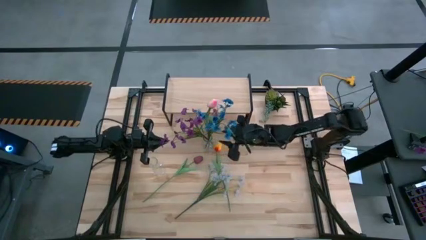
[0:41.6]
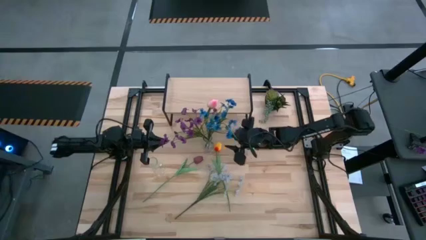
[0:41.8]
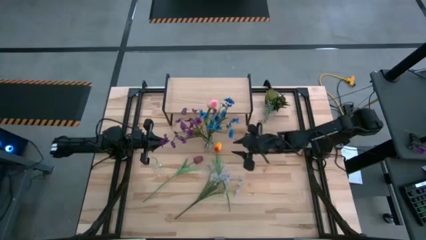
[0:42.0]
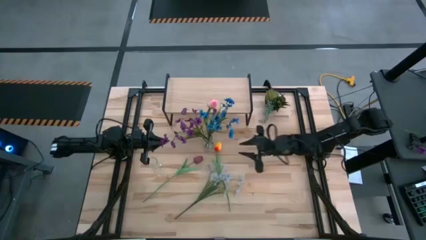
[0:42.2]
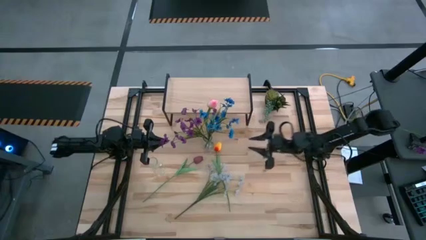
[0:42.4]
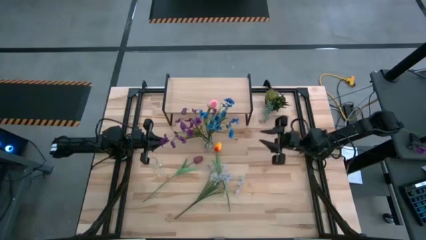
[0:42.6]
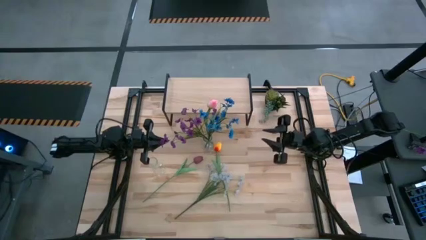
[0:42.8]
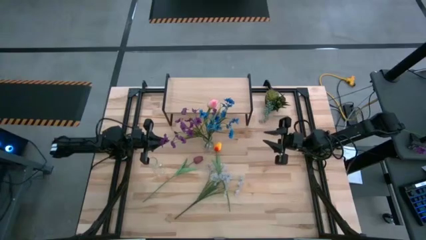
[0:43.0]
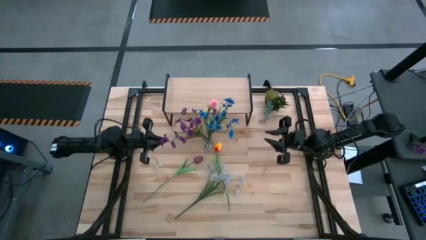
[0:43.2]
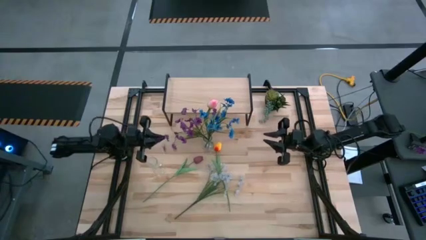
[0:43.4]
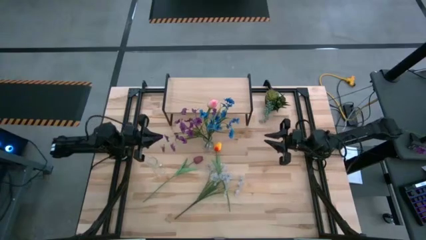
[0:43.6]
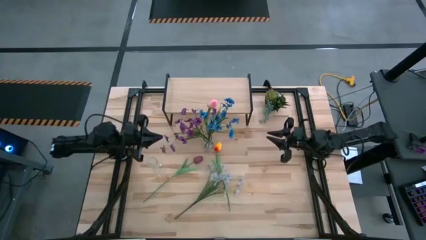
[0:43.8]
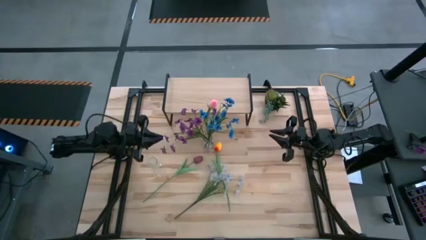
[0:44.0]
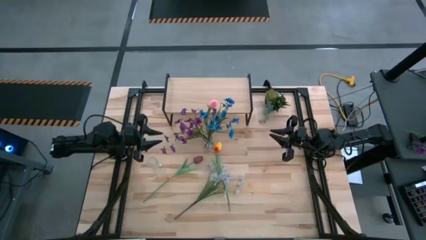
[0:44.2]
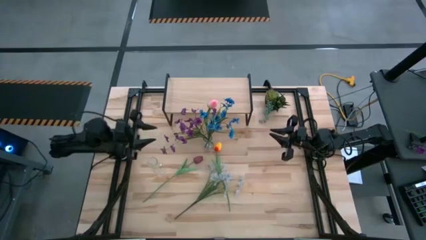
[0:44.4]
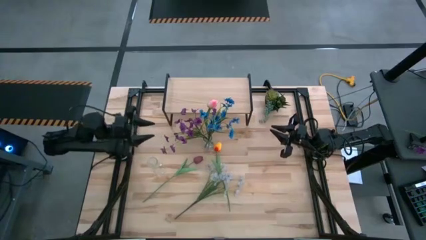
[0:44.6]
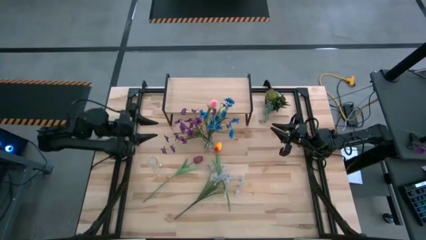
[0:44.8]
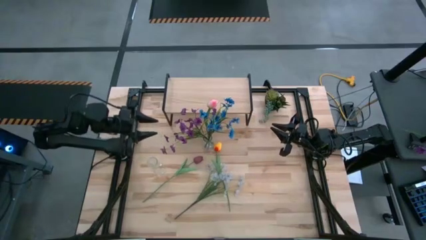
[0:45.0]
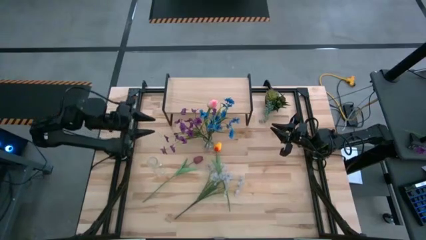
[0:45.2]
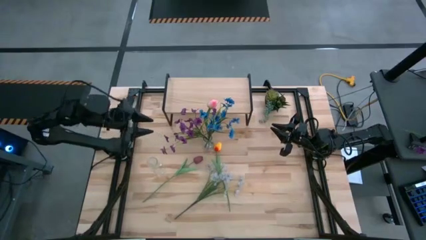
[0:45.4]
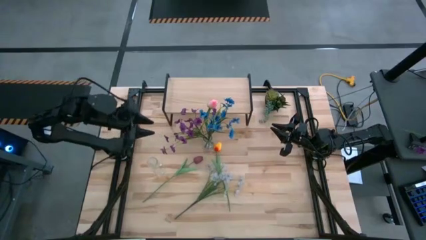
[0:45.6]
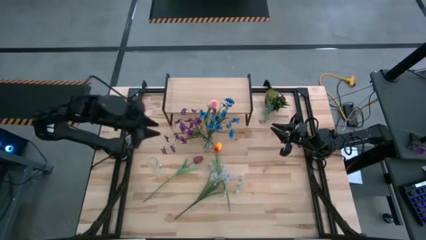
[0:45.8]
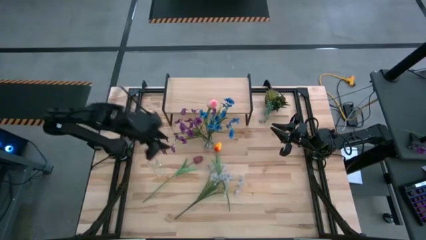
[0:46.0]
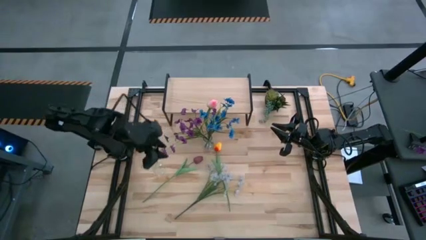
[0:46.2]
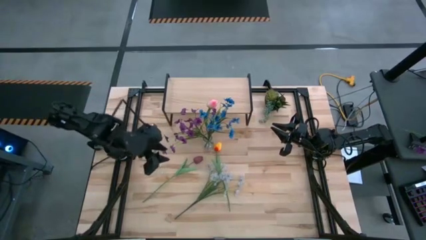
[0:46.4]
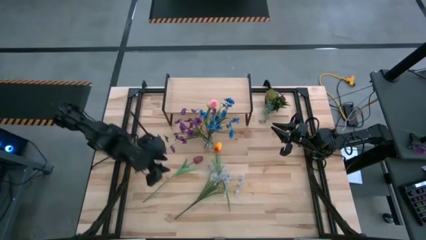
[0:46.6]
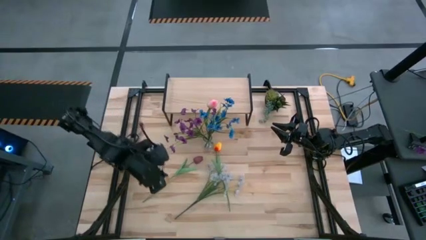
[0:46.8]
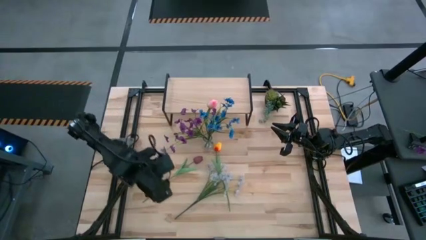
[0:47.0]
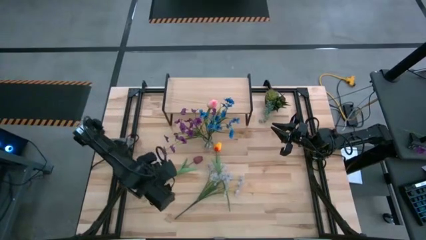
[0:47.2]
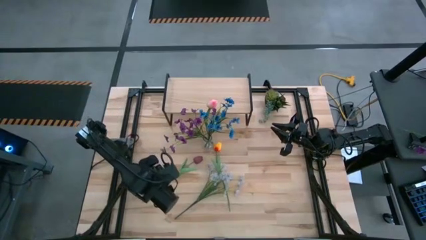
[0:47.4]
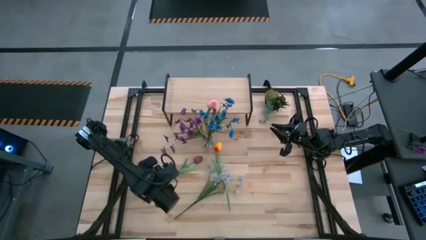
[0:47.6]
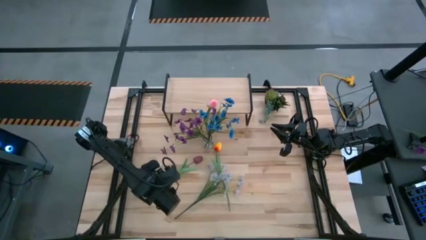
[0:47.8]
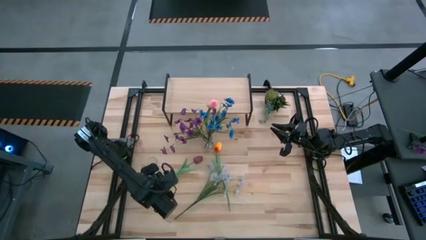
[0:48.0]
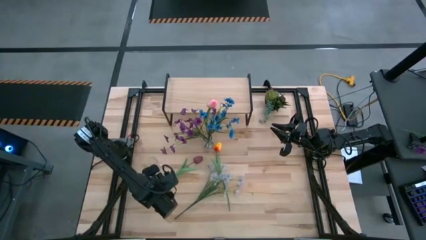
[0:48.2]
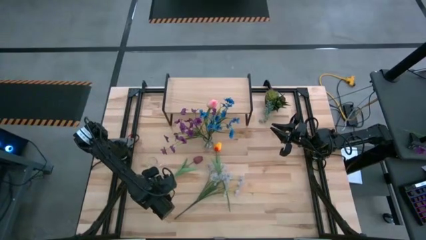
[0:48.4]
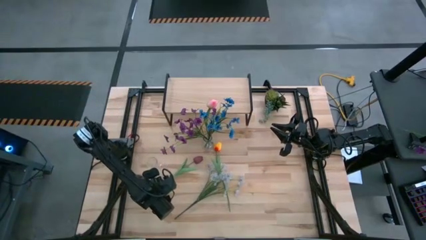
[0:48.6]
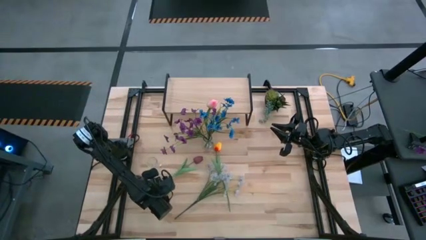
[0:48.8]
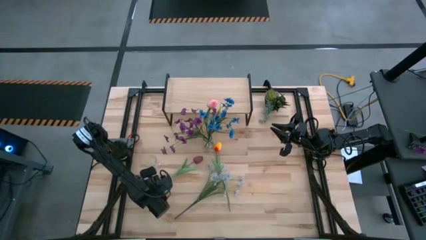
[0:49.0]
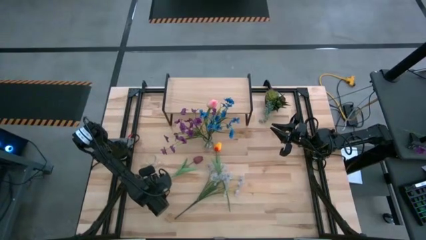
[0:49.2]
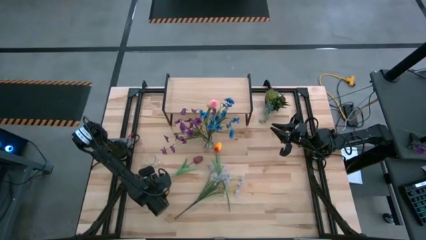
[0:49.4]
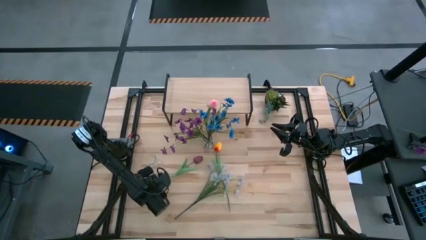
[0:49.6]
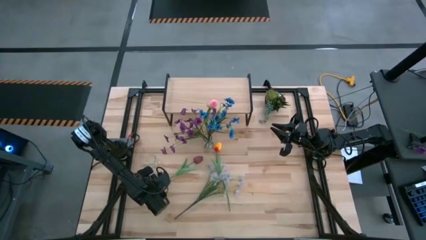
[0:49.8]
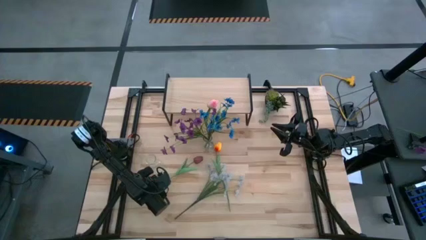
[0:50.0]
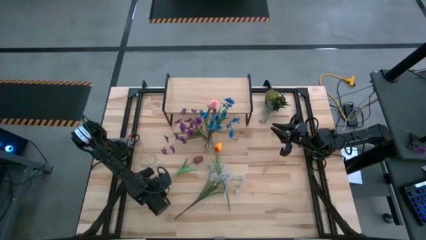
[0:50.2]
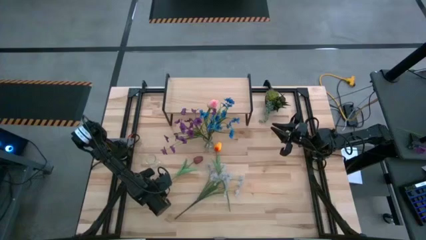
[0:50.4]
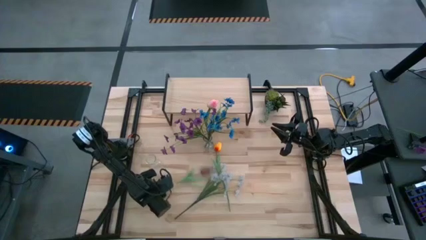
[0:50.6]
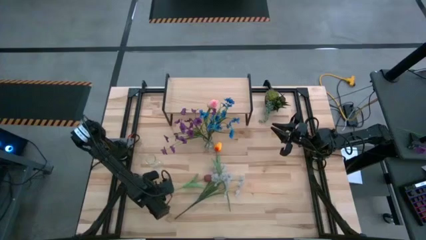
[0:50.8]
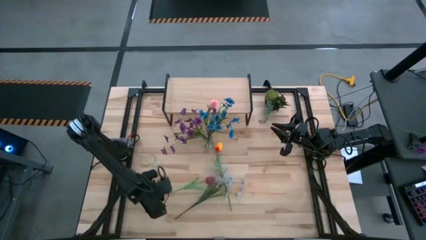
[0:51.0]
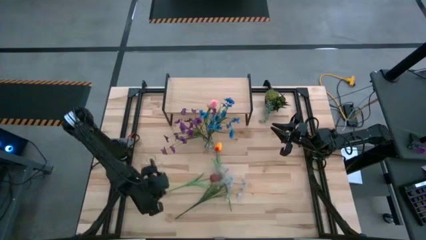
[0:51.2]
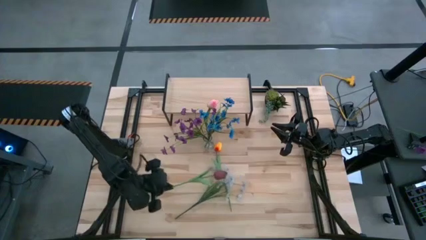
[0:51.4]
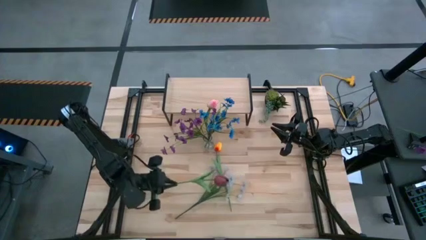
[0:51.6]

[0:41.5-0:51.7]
Task: Pick and place flowers into a vace then onto a shelf
Put the red flower into the left transparent vase

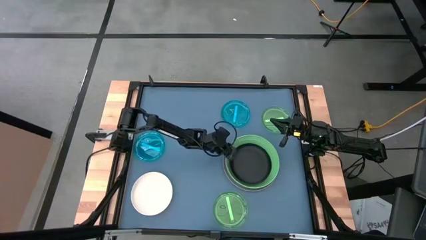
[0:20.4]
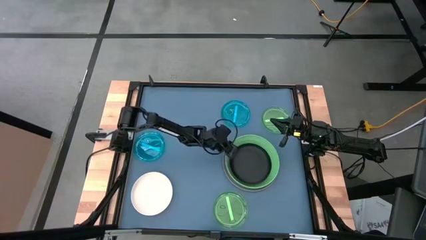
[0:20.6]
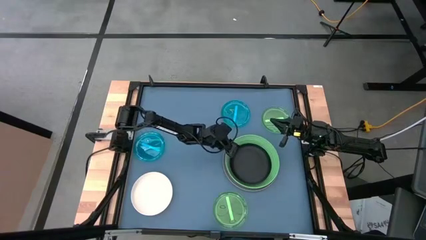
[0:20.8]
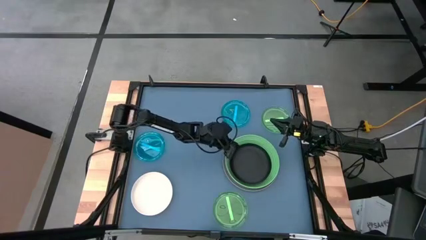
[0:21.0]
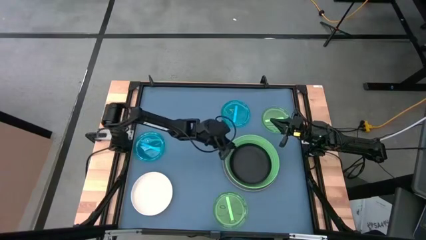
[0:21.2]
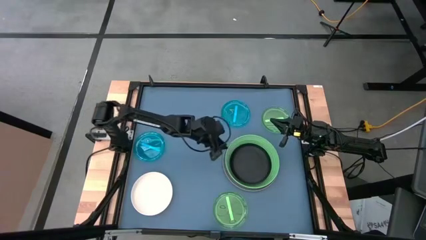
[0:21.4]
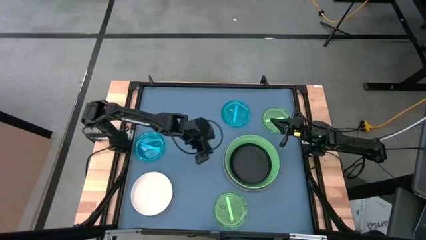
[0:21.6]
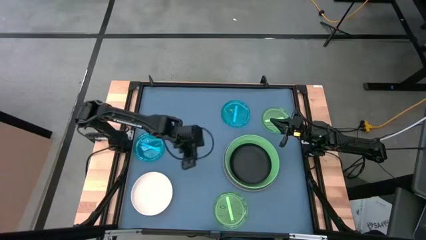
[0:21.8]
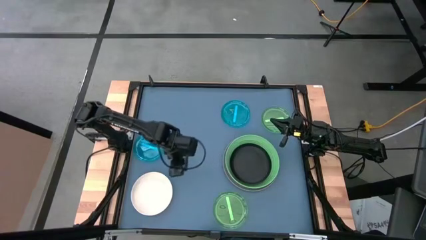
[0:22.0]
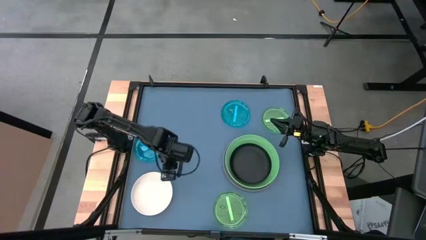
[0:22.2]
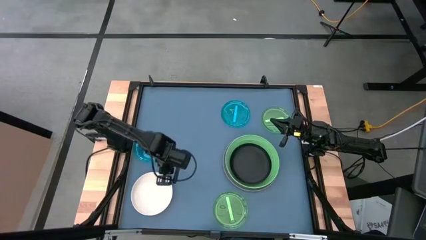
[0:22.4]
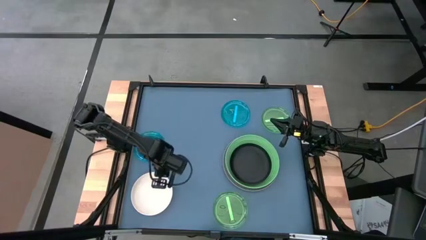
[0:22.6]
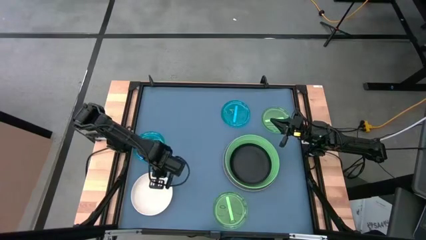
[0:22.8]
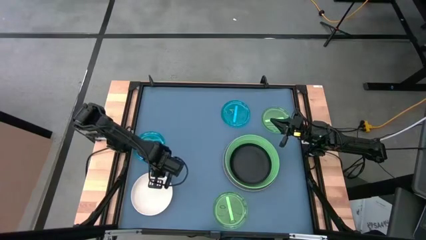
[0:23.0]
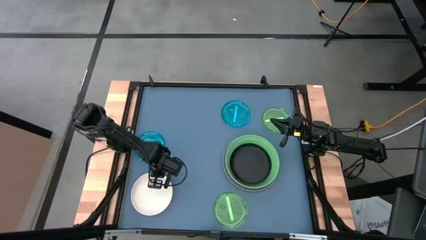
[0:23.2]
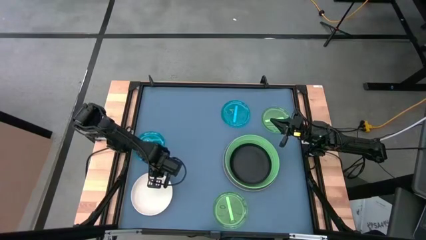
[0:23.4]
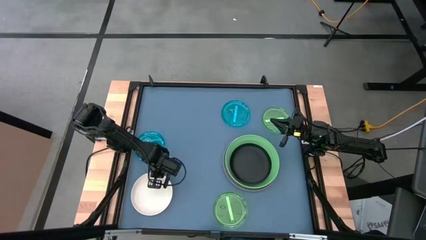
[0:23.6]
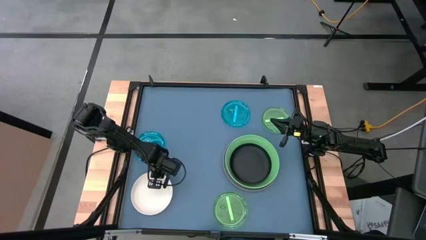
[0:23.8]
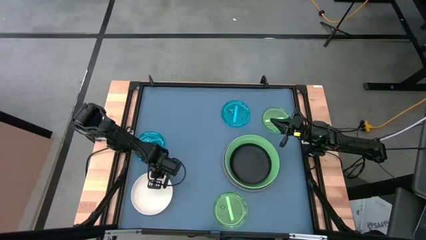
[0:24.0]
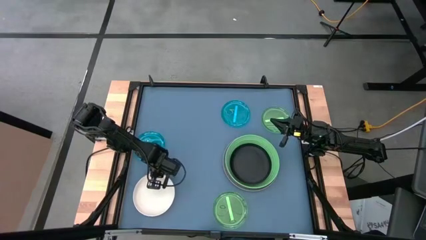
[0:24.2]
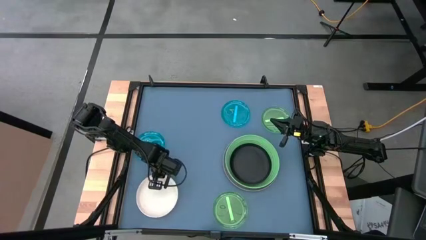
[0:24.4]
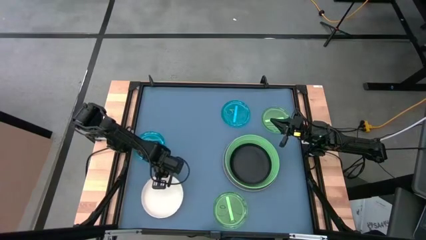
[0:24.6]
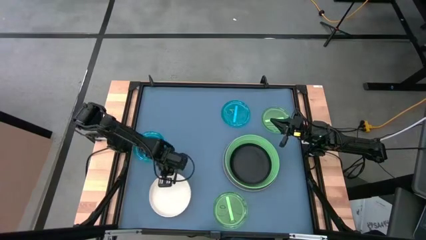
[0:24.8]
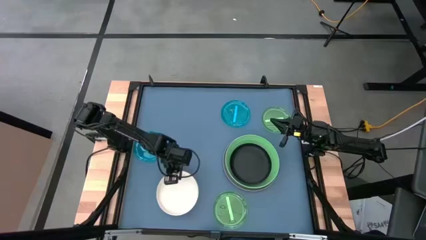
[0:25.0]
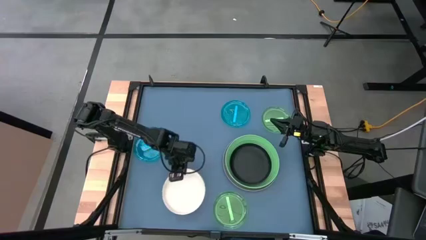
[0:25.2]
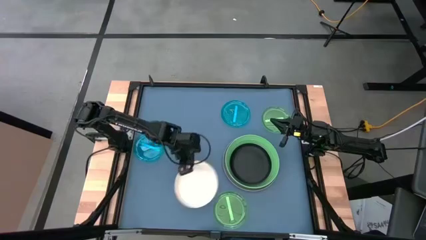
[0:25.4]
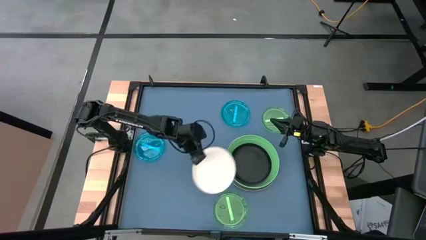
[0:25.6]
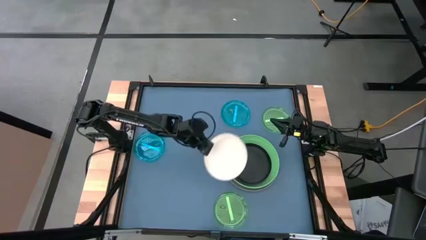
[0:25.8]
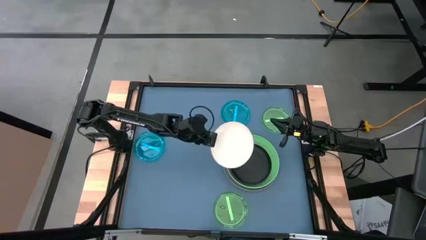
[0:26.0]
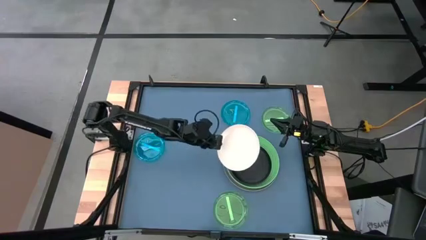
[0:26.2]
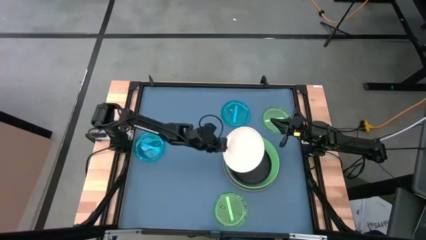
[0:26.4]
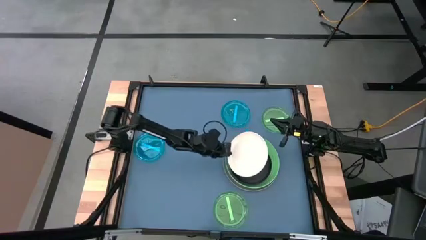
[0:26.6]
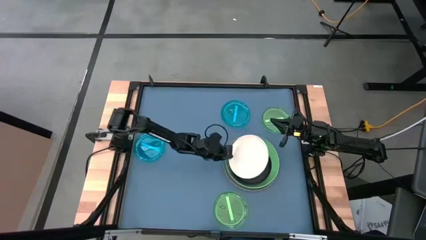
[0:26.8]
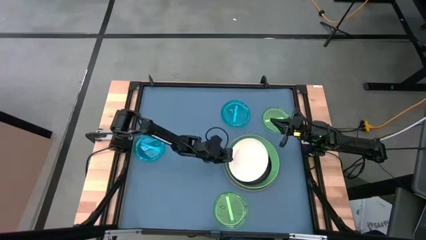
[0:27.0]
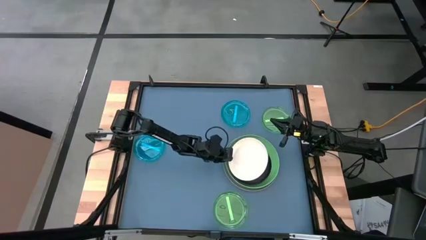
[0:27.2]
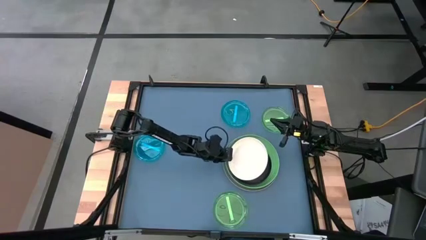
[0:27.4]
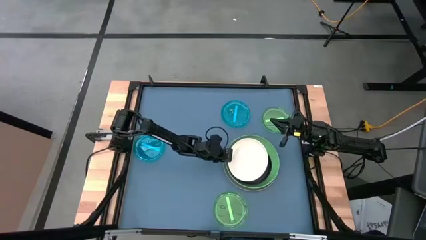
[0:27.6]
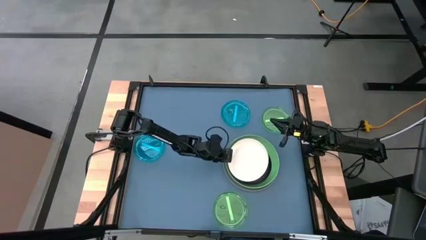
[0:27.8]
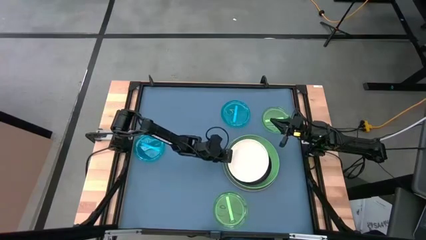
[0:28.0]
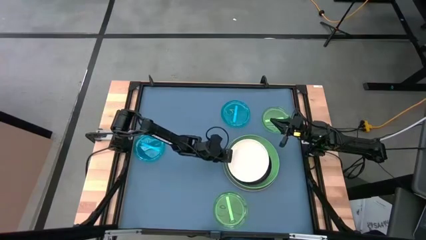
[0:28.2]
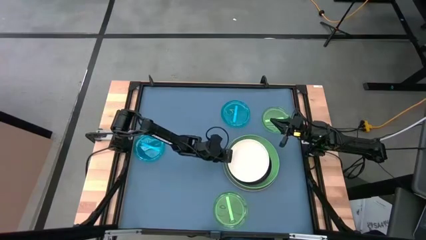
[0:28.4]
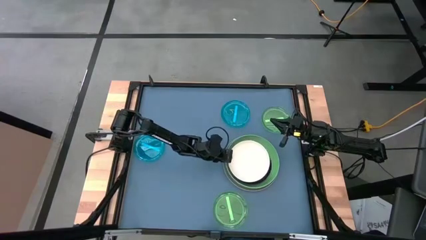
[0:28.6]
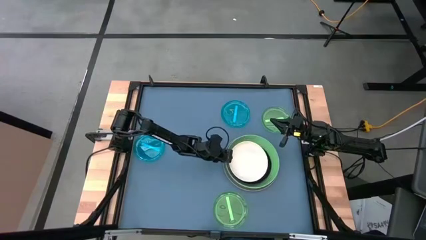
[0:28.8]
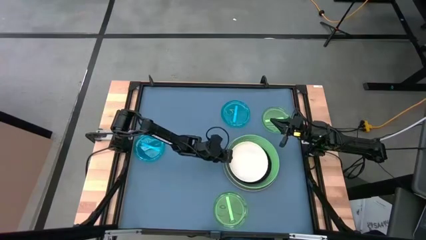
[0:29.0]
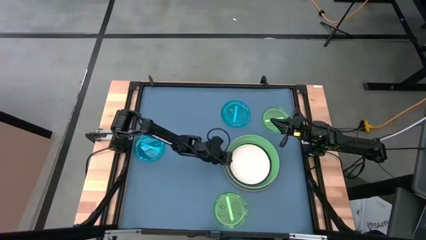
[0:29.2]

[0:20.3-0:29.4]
Task: Stack plastic plates
Stack the white plate on top of the black plate
